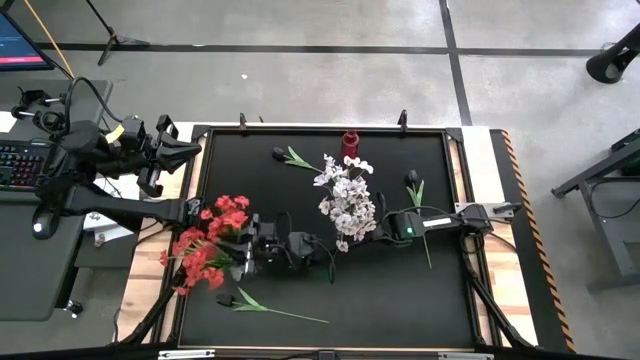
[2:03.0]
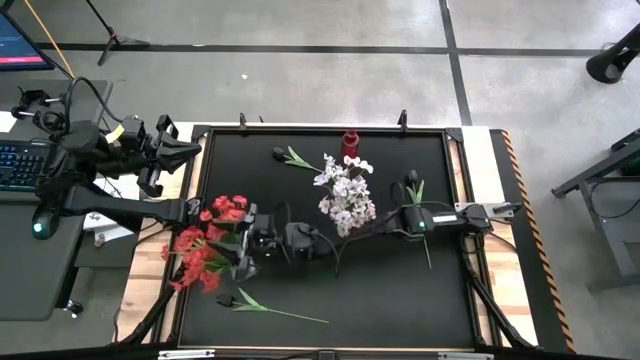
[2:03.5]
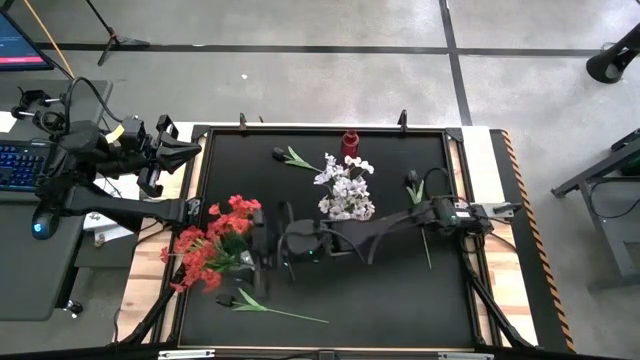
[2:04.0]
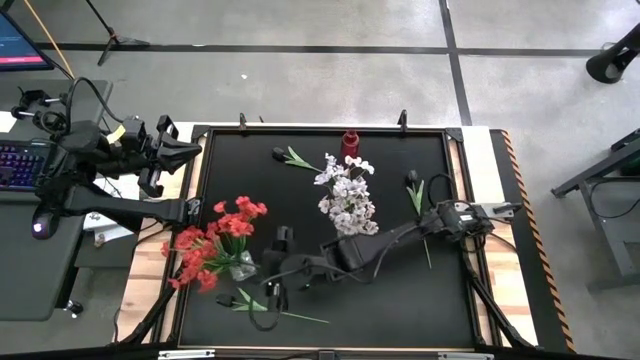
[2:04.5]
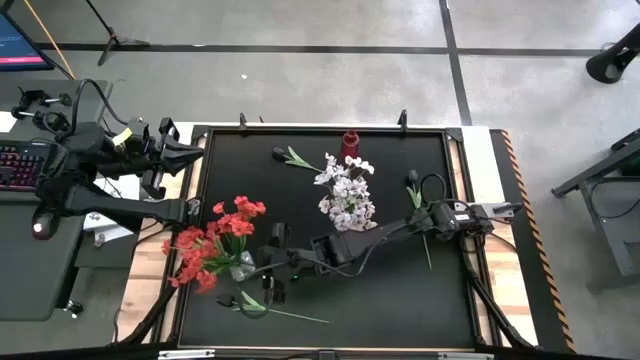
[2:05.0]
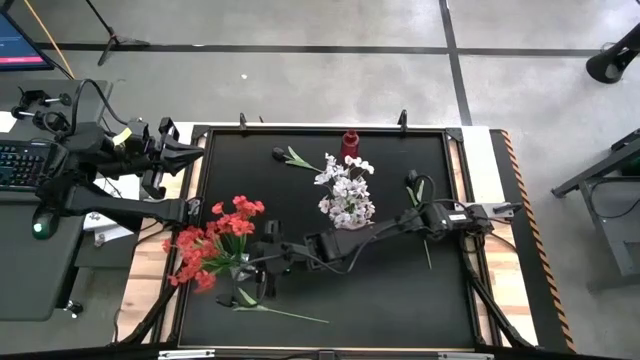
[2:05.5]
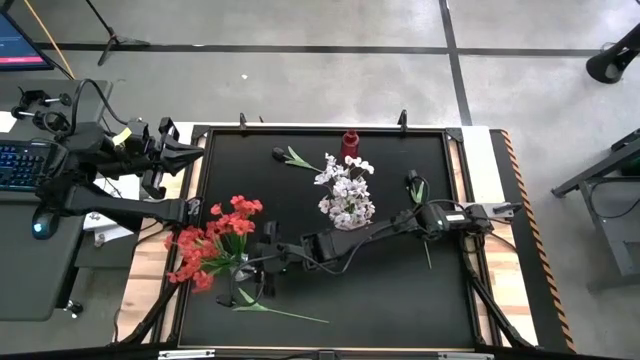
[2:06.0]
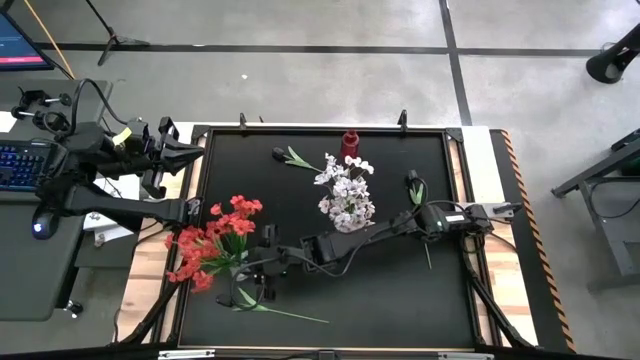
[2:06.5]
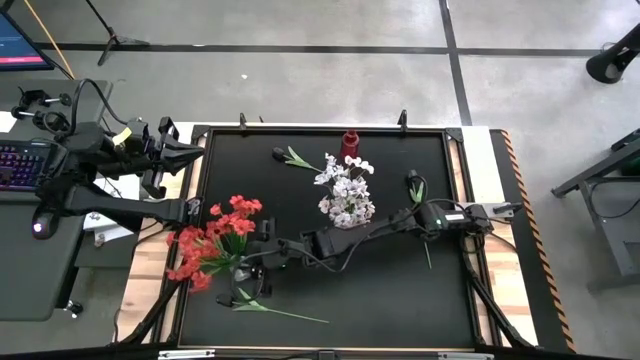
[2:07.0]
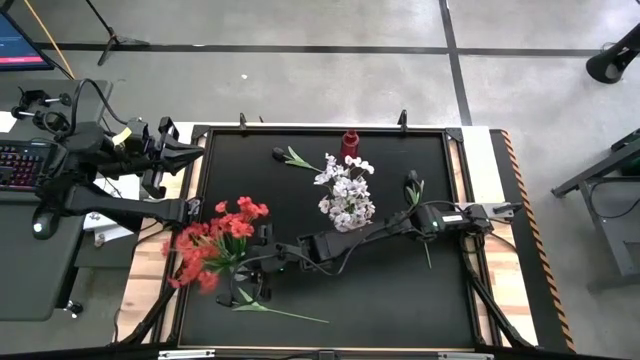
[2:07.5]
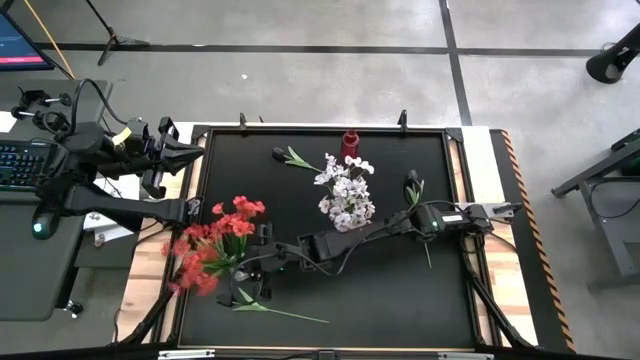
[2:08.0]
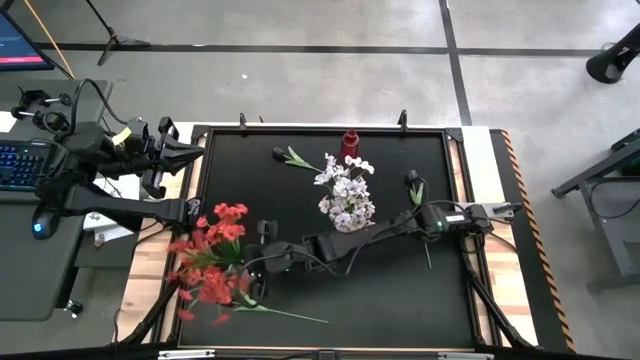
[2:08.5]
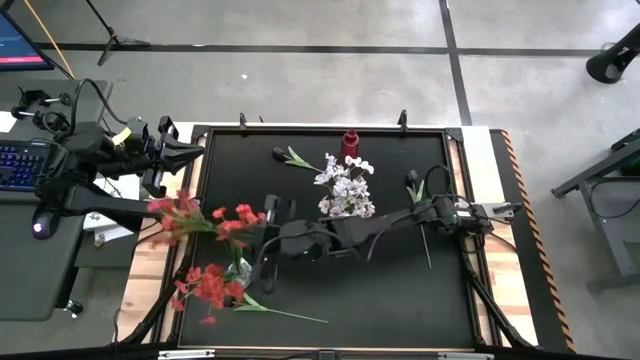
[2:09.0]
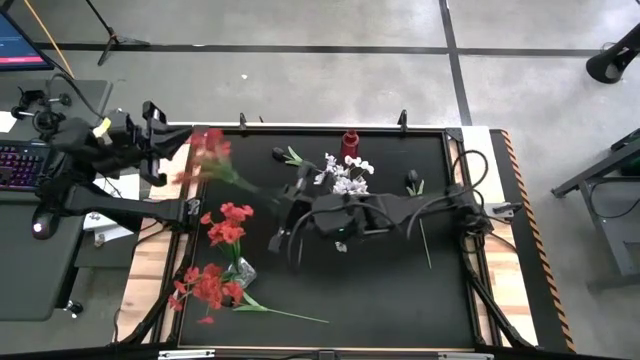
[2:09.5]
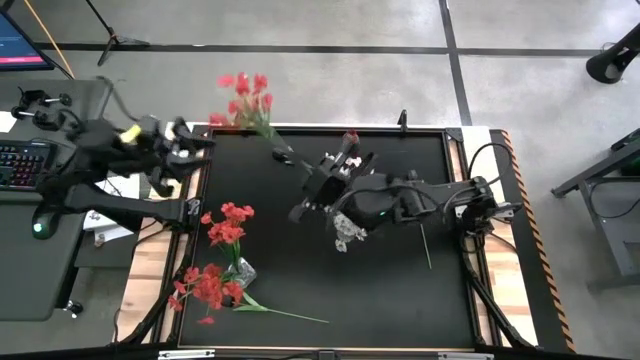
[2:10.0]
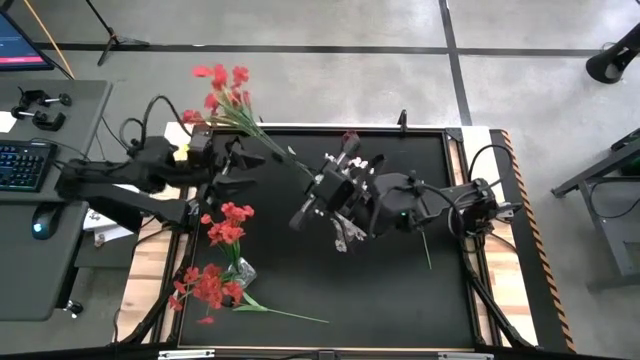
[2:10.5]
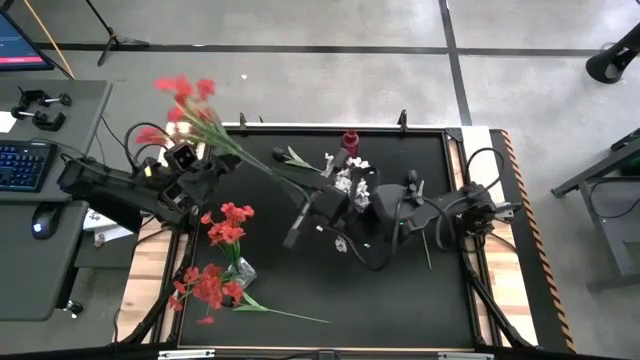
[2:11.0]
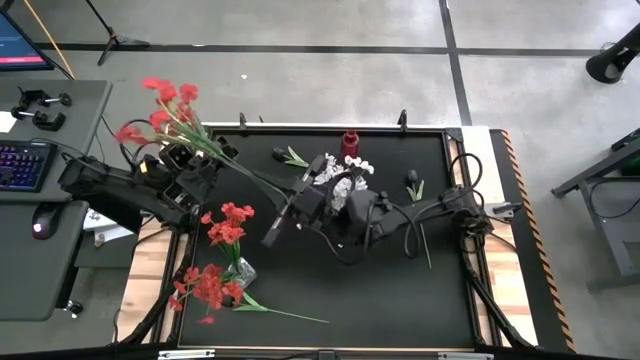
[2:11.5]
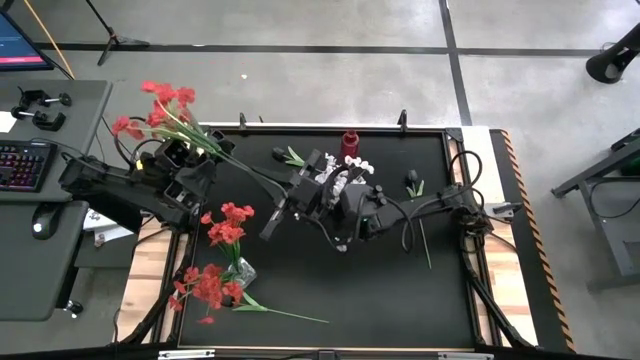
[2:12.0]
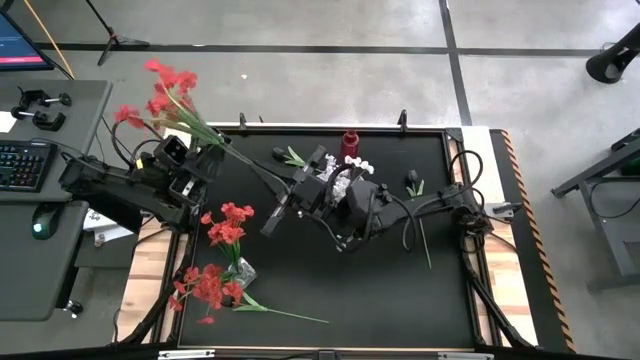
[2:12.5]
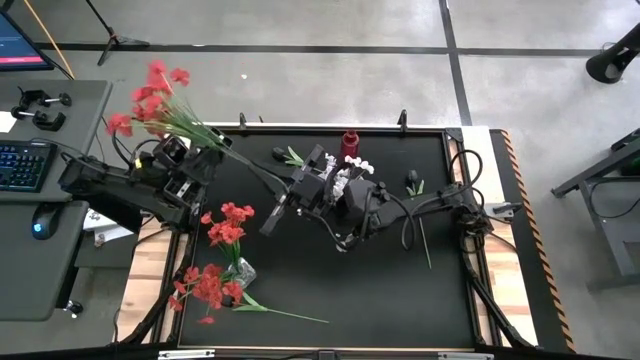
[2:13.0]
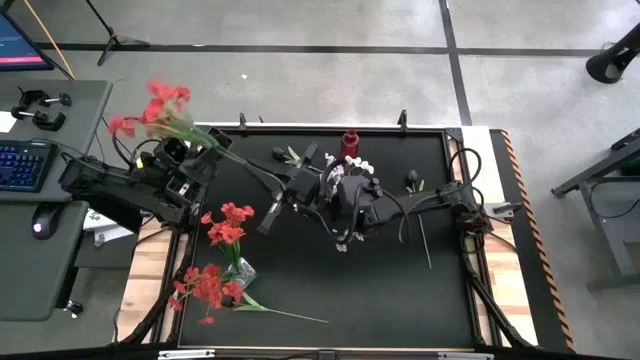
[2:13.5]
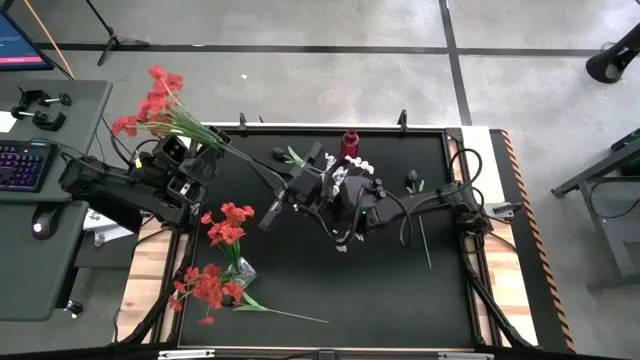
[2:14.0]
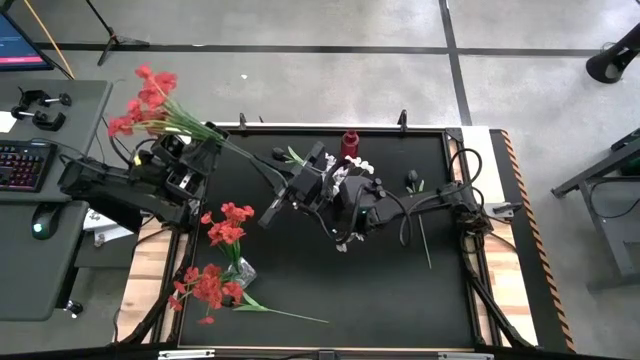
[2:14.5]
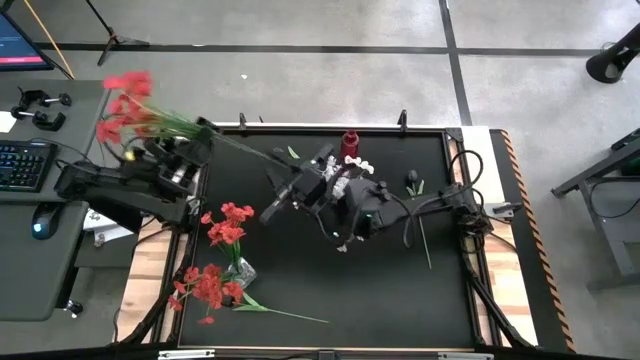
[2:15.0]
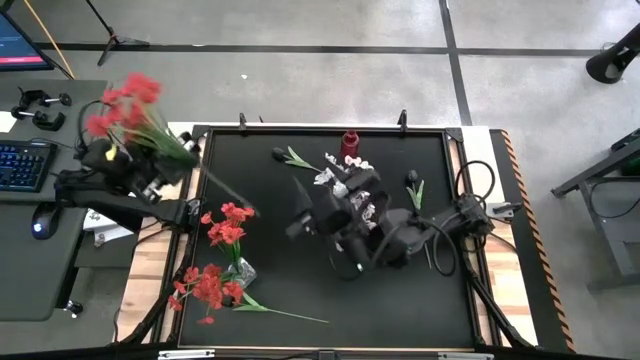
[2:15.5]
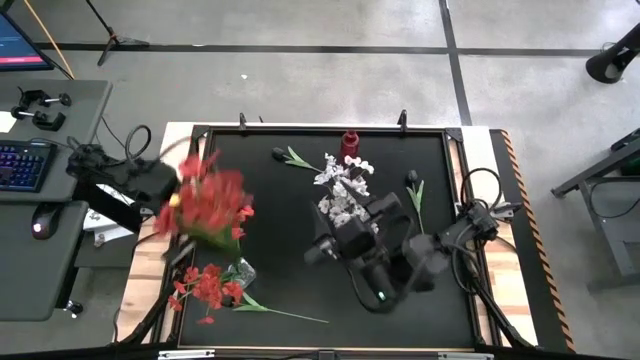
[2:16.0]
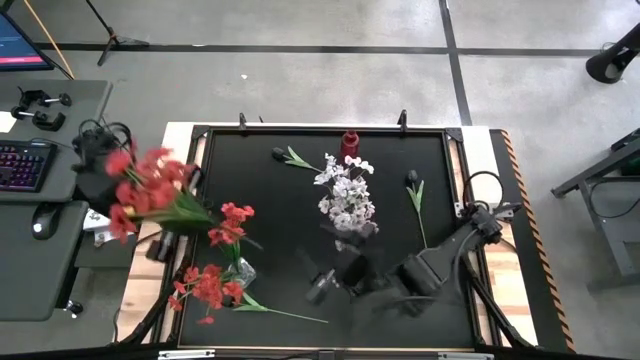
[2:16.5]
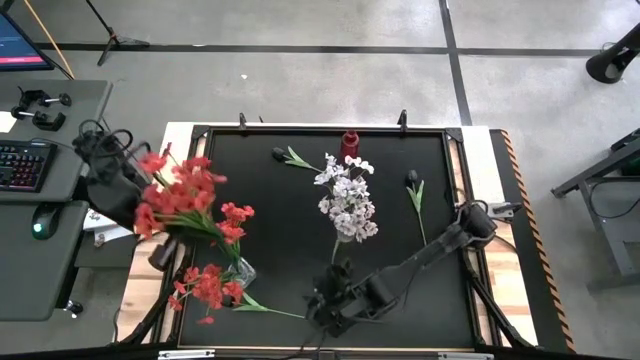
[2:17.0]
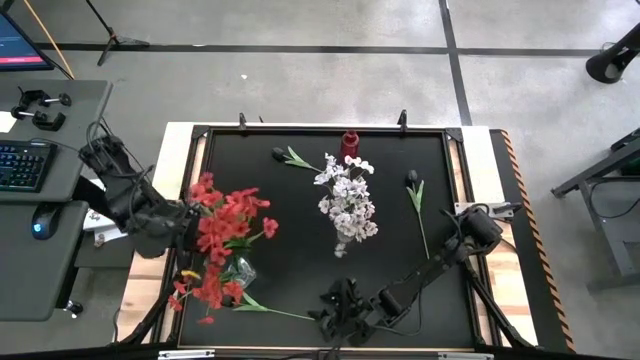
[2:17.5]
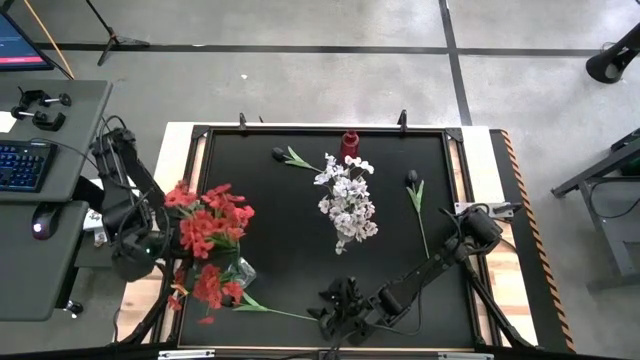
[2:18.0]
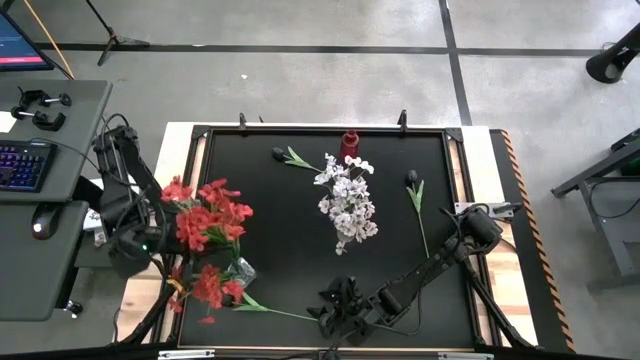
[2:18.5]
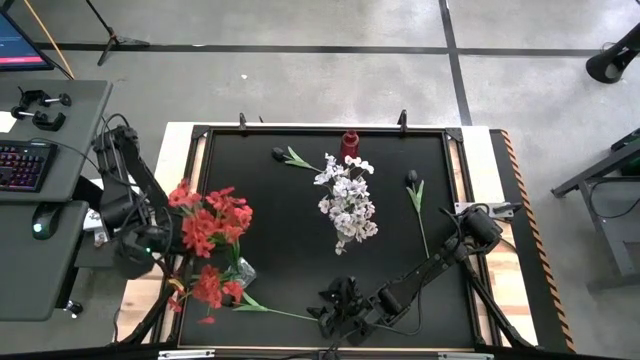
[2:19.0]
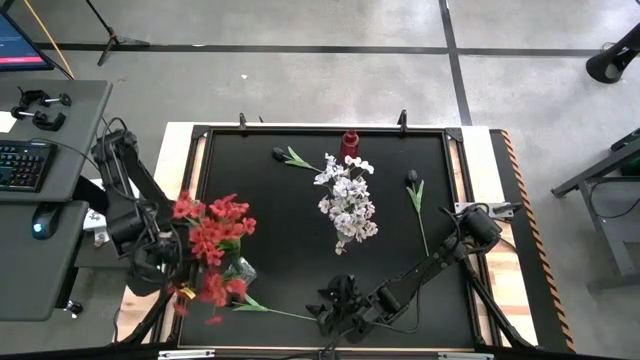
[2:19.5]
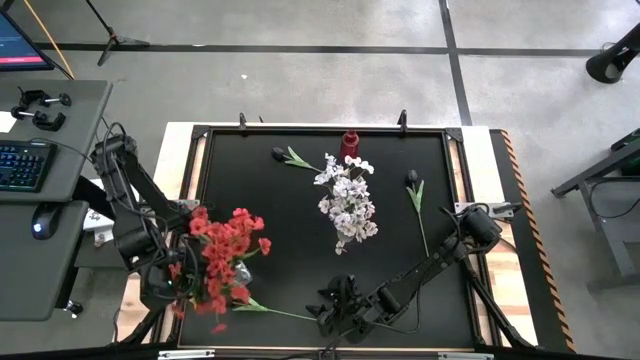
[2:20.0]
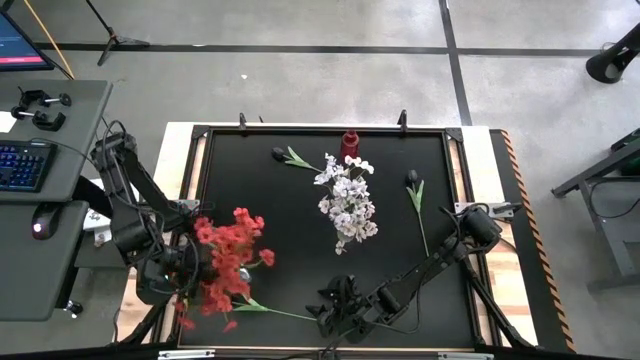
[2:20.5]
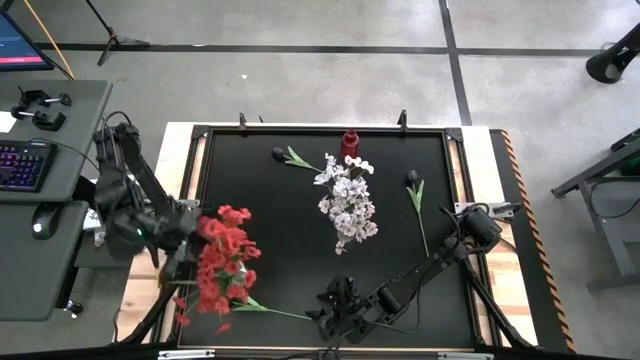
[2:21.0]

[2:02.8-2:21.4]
Task: Sort flowers into vase by color
Put the red flowers into the left transparent vase

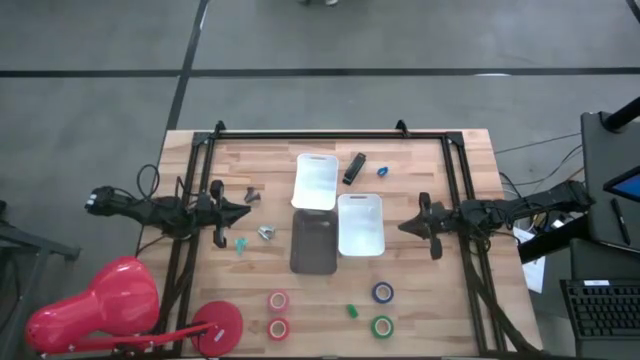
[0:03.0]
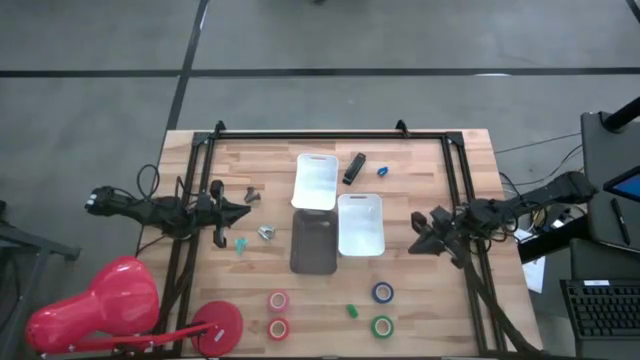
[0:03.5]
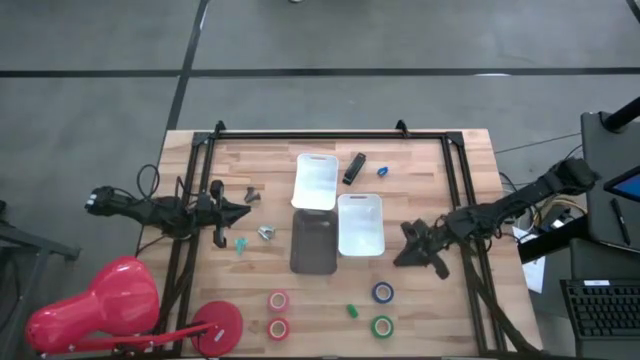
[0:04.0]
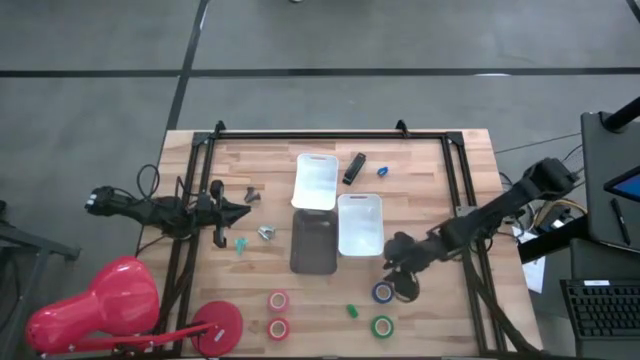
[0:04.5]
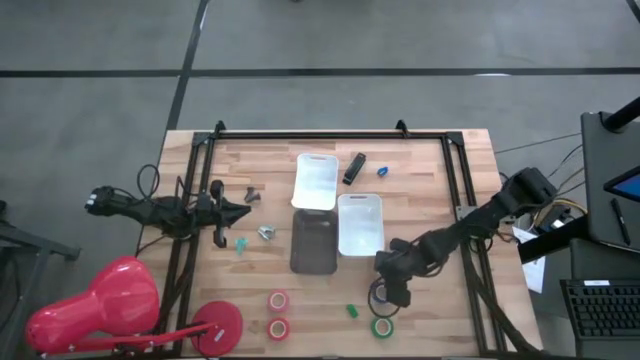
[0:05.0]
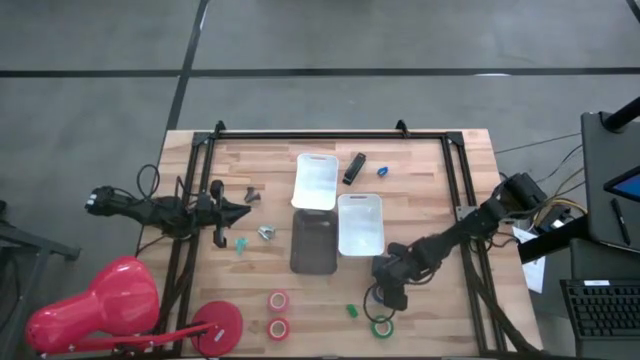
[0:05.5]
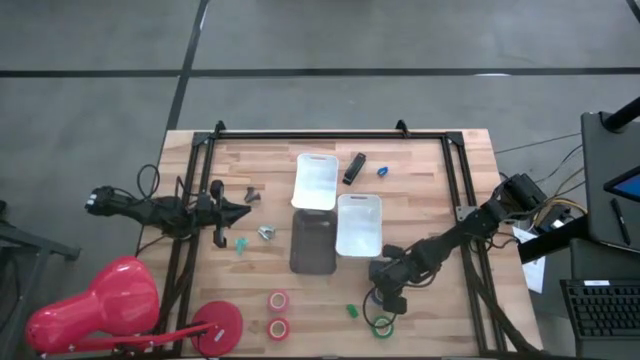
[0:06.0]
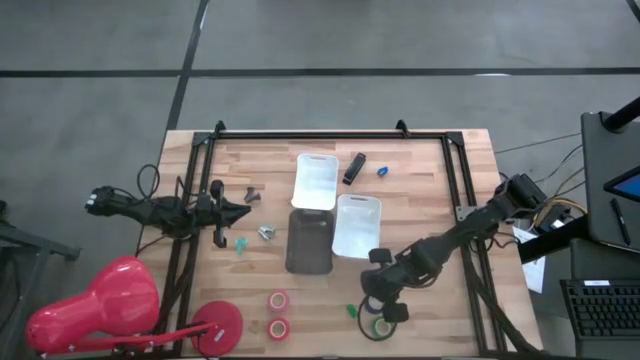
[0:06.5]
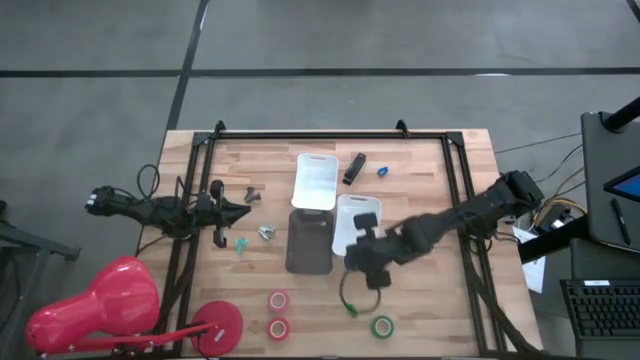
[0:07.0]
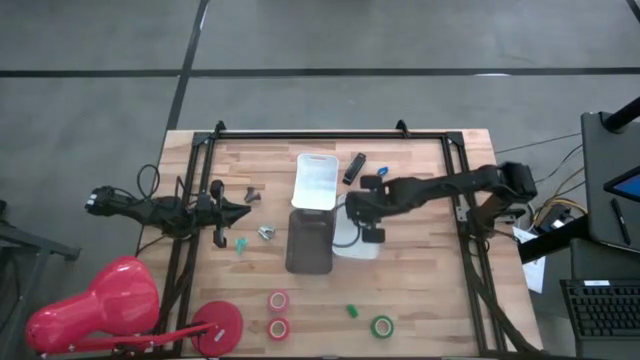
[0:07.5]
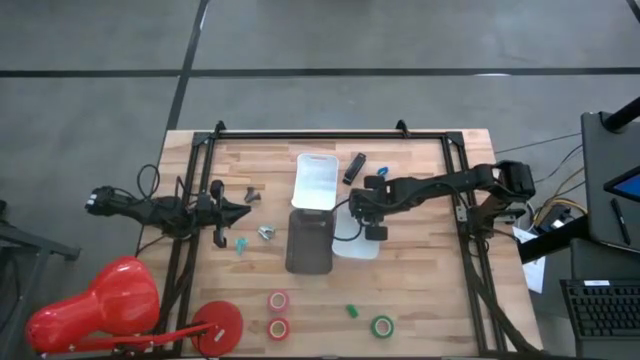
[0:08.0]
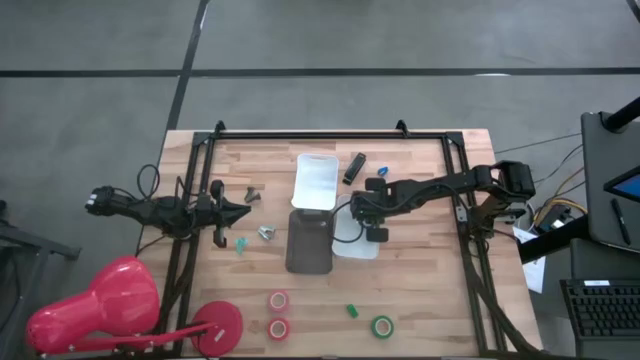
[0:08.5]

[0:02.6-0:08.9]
Task: Pick and place Stapler, Stapler remover, tape
Put the blue tape into the bottom white bin
